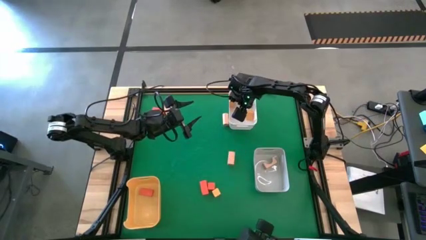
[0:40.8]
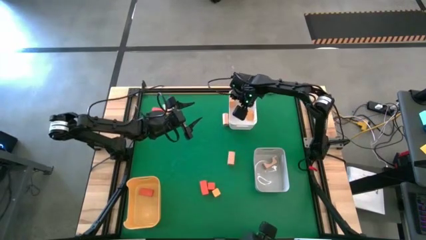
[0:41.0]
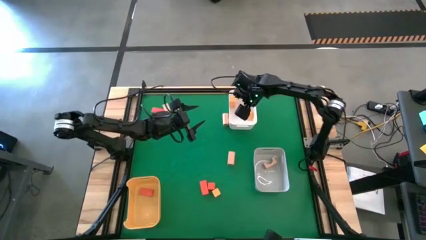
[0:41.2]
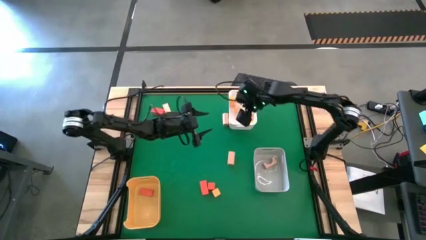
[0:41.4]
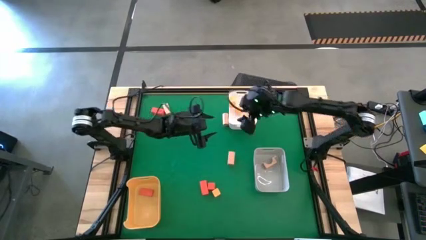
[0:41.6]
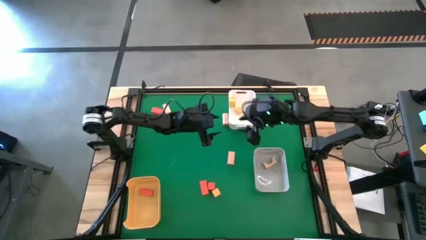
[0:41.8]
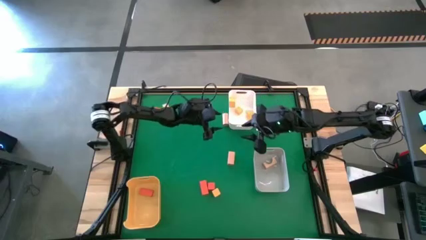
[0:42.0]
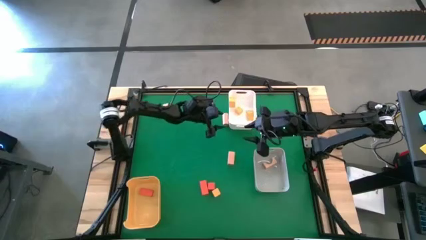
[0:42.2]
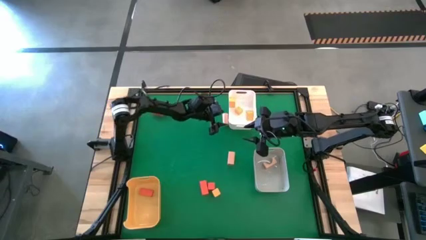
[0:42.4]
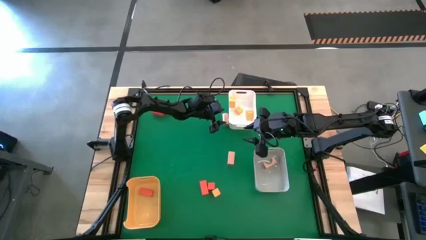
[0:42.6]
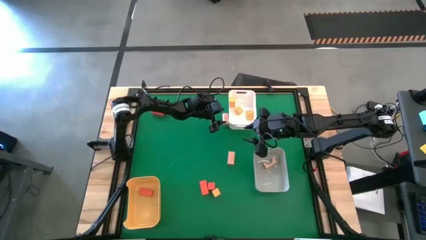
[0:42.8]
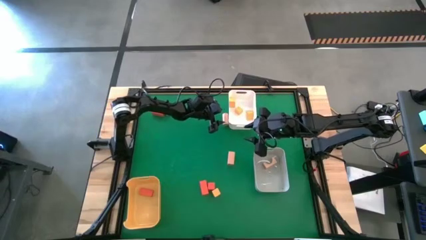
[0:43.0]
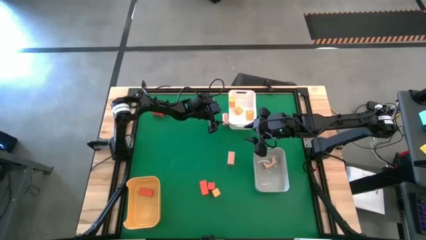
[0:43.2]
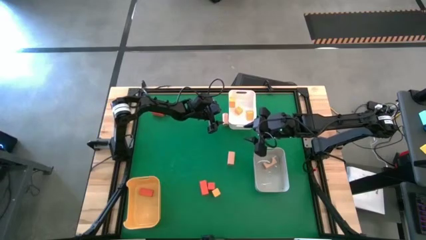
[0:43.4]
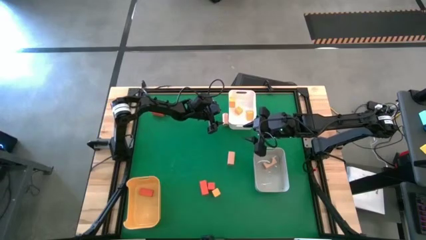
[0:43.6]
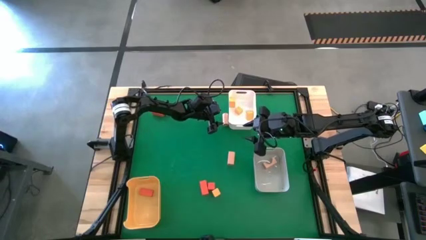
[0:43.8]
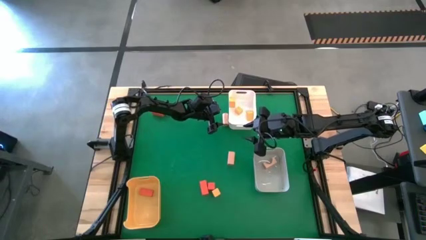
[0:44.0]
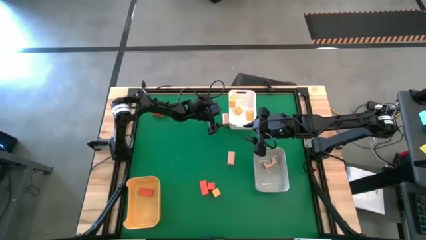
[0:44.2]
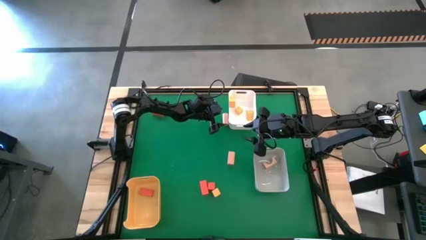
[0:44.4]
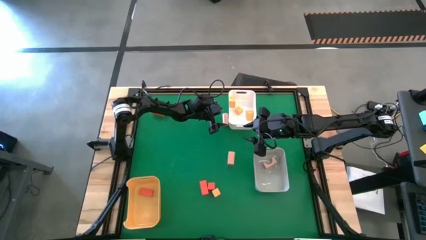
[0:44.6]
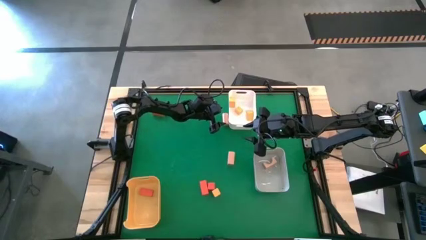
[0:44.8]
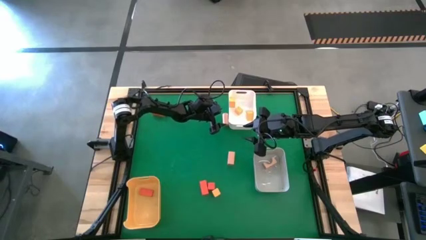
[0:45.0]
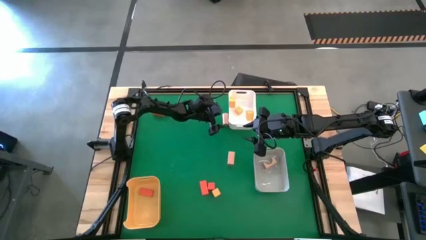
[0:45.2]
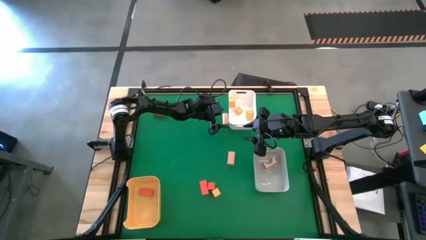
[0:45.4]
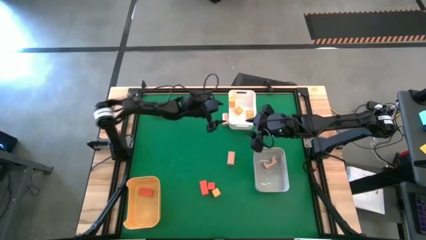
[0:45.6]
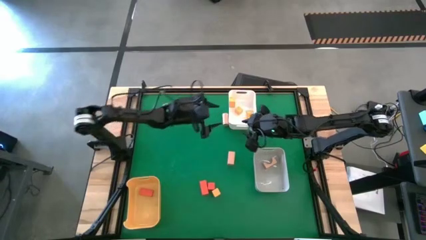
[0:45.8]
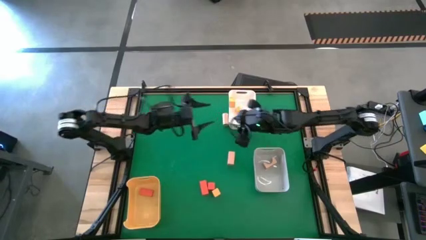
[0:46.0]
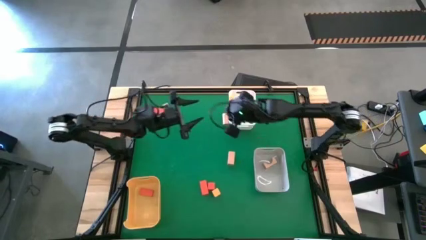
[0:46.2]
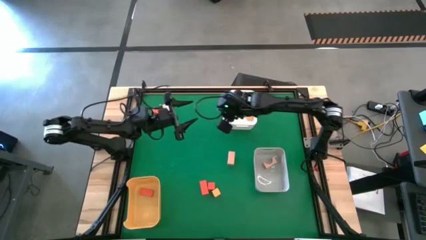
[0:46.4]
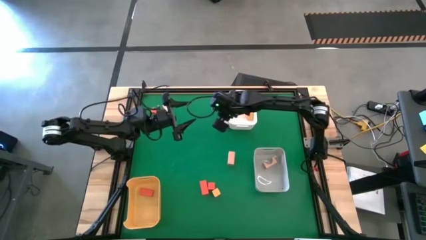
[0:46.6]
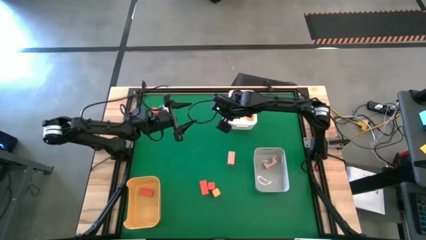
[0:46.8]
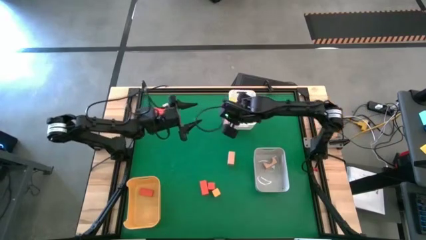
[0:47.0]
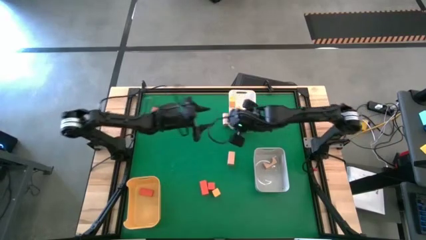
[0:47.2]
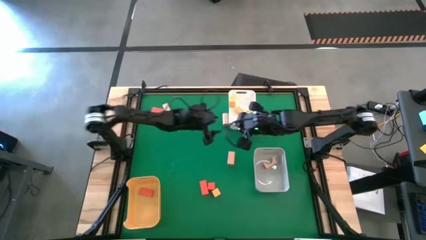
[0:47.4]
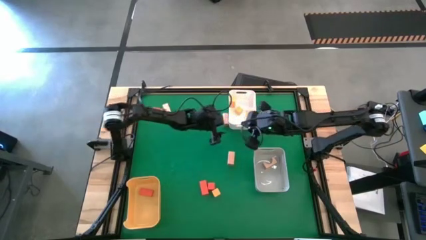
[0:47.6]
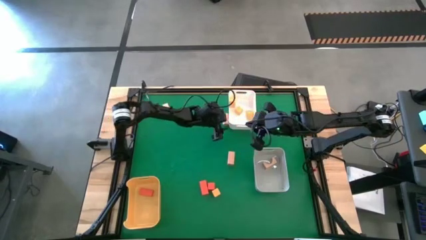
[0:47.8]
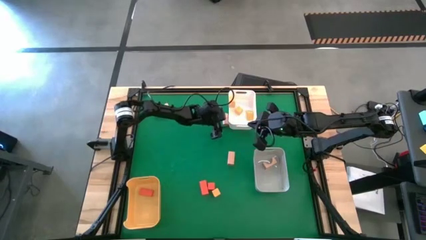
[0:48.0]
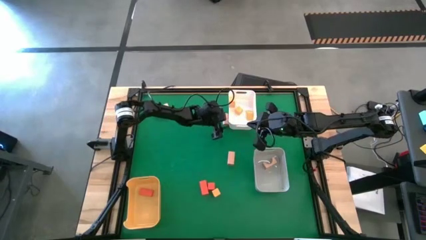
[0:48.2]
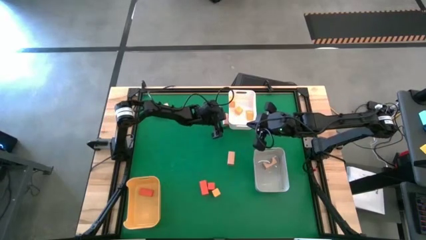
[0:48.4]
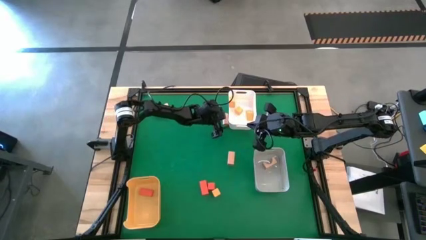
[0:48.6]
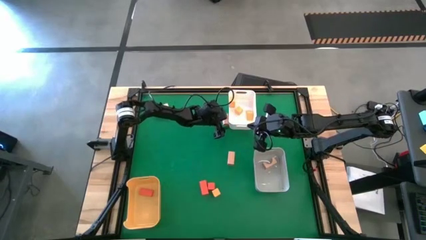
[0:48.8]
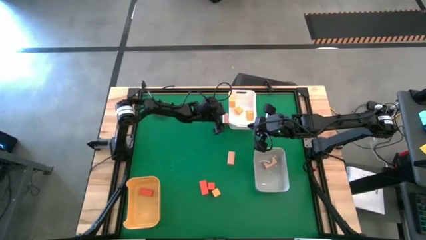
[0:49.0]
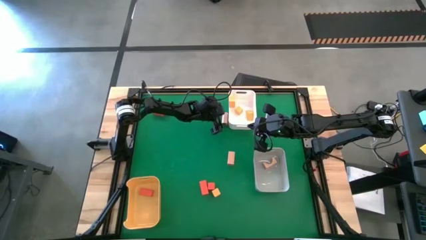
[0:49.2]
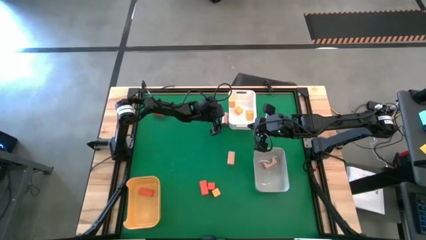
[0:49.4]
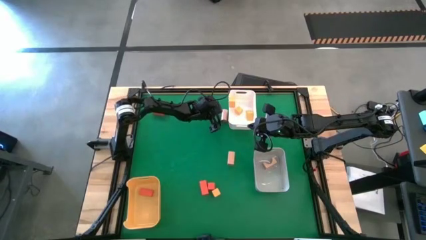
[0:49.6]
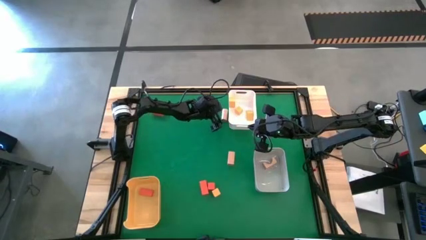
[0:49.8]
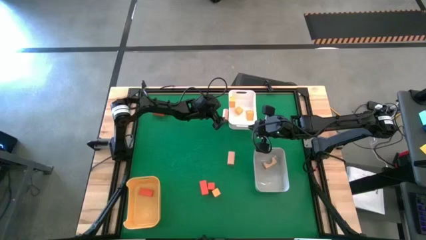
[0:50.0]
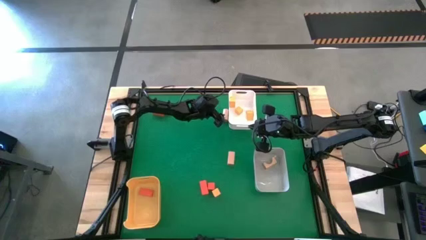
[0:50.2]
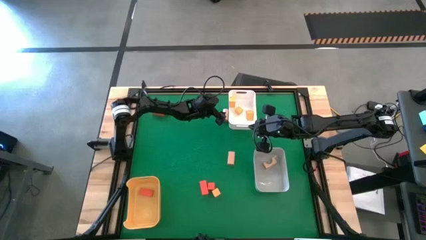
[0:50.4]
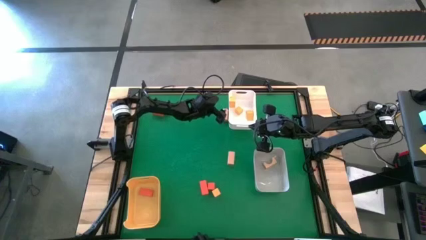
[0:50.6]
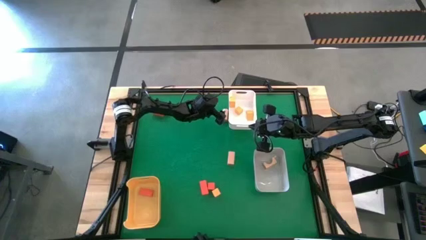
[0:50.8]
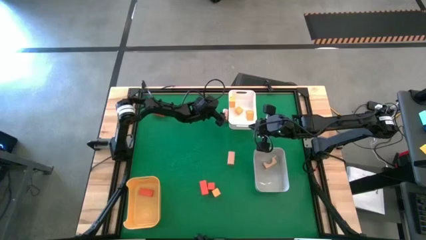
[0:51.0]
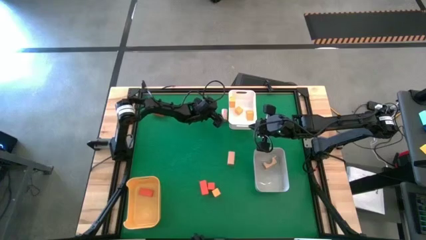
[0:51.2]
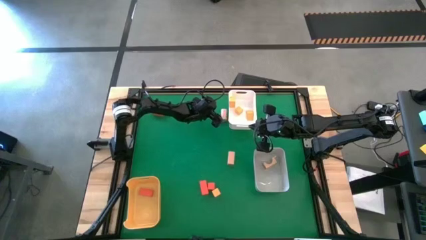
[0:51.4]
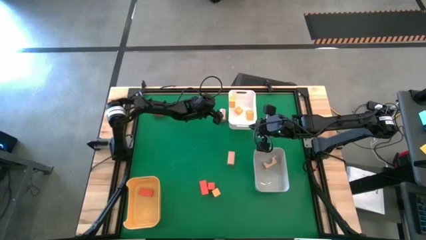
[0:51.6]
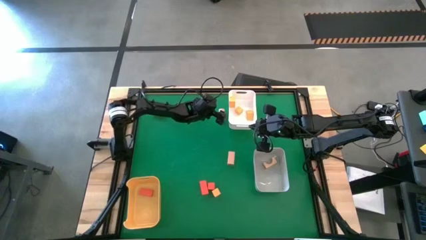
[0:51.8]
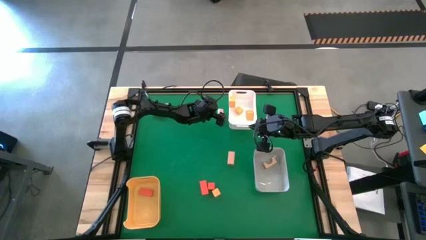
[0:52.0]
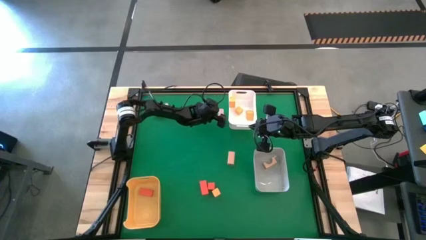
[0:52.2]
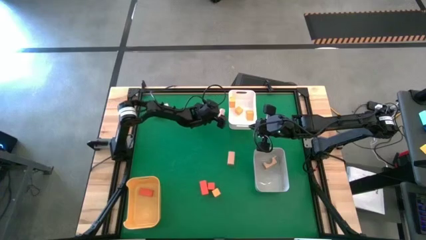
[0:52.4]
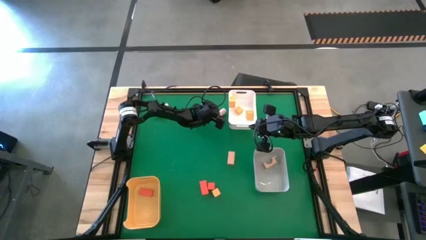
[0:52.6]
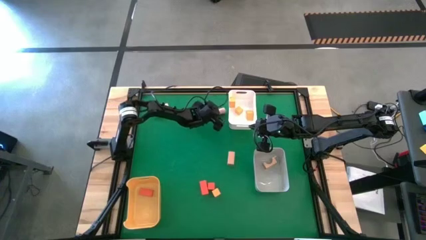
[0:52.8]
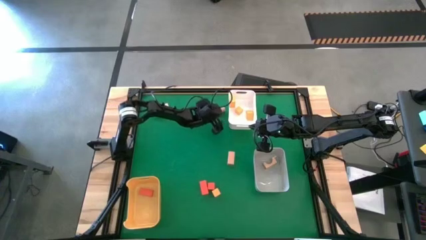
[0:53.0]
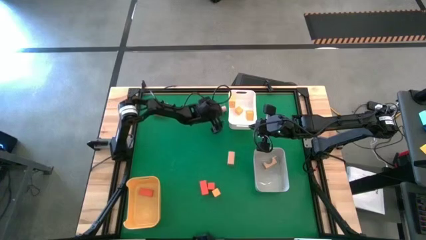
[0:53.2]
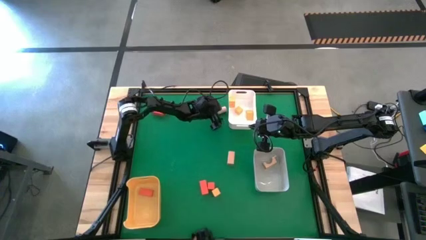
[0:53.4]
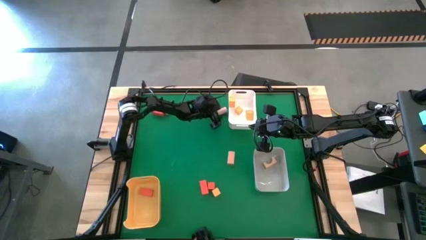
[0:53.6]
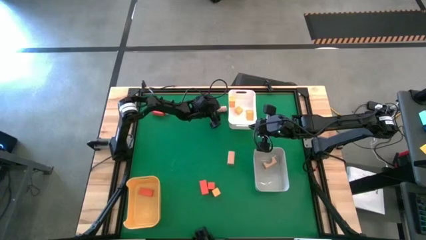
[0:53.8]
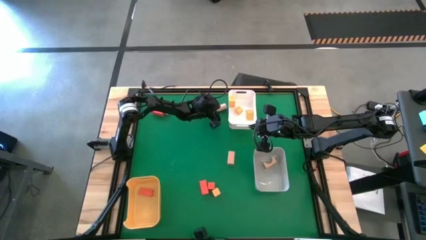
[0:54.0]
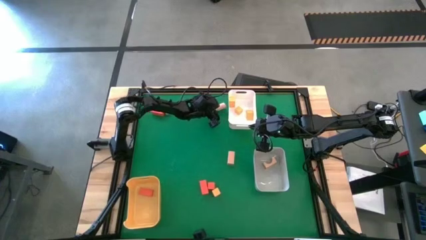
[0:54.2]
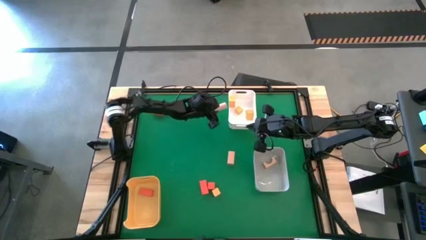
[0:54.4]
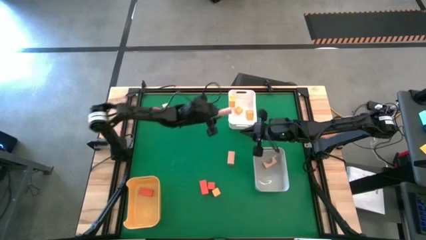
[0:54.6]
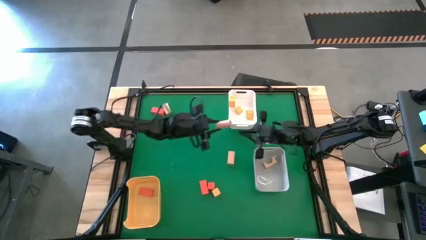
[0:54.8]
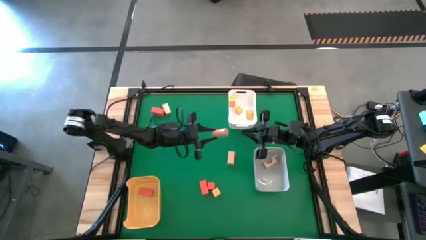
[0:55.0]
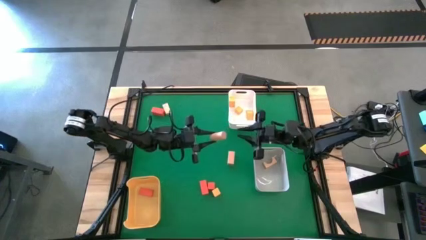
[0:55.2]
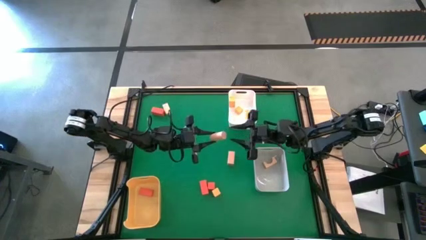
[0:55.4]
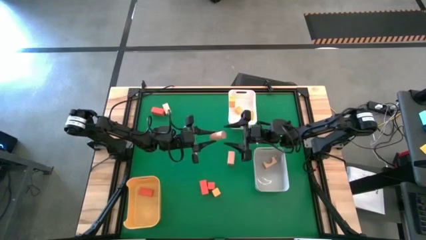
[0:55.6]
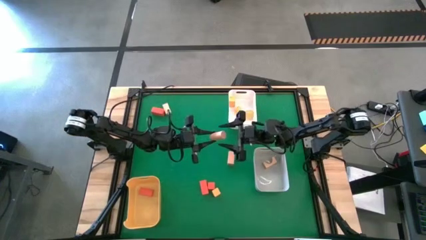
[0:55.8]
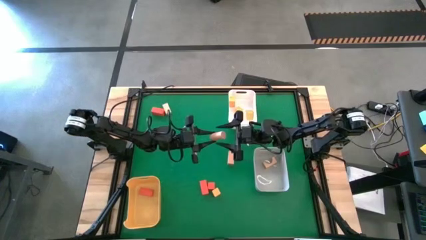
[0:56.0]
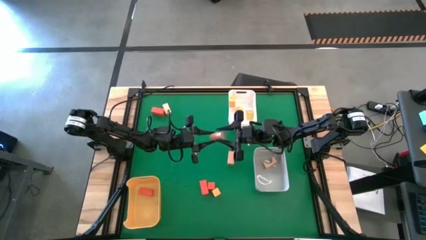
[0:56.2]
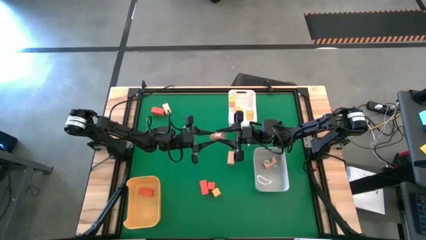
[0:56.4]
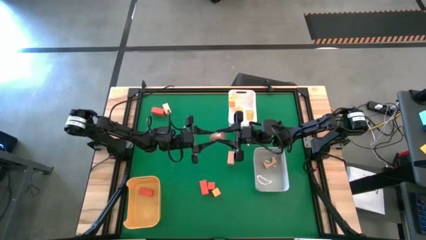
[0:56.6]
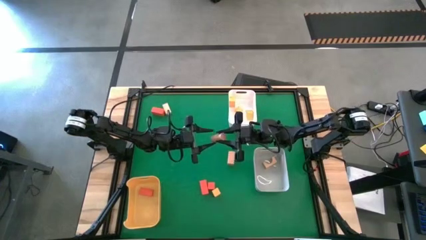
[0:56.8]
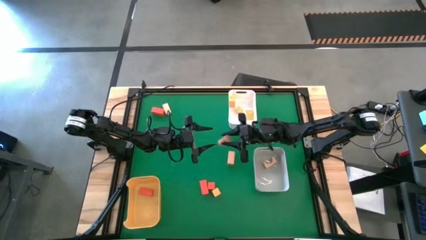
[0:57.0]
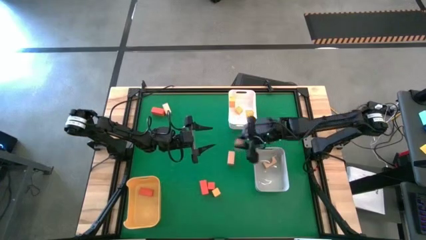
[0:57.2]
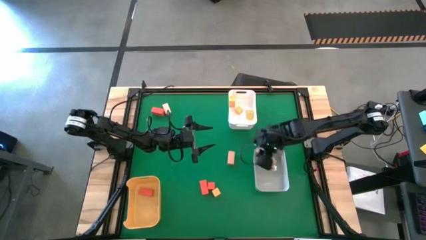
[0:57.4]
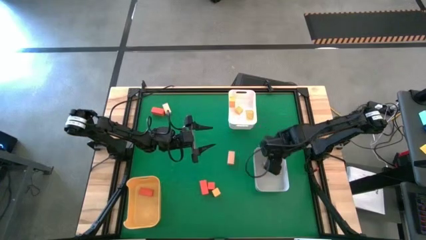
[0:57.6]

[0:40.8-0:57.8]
Task: Sort & place blocks by color
Put the brown block into the gray bin
